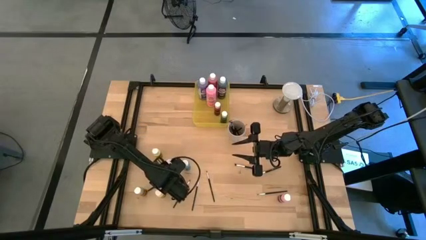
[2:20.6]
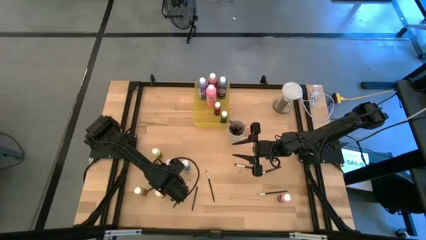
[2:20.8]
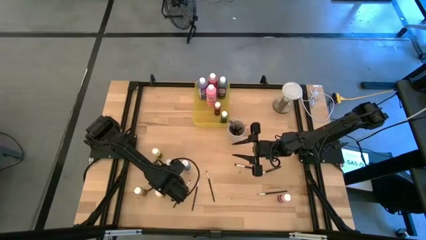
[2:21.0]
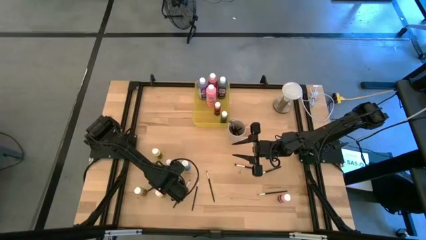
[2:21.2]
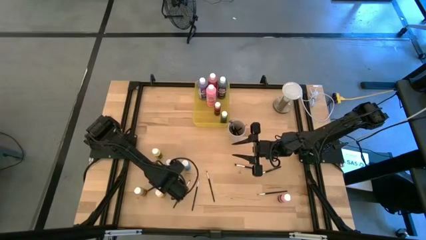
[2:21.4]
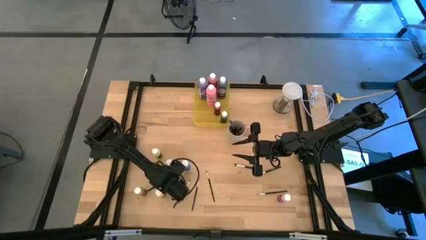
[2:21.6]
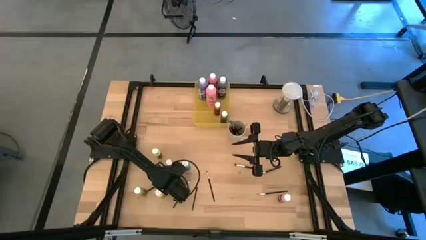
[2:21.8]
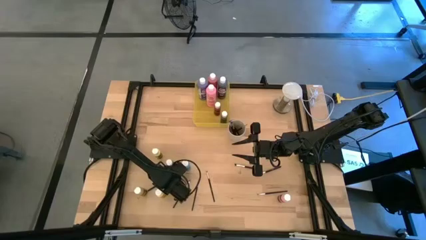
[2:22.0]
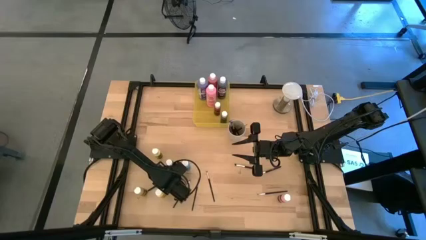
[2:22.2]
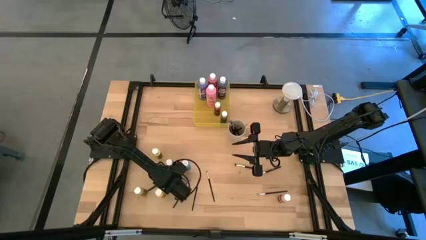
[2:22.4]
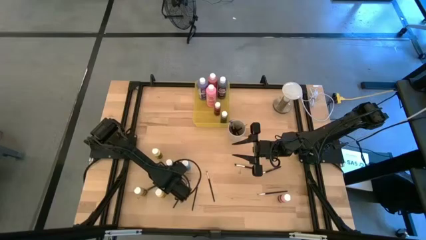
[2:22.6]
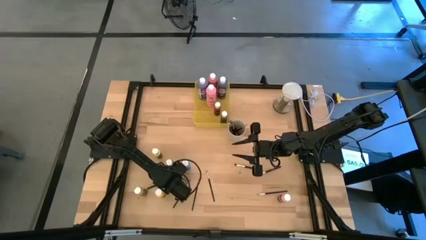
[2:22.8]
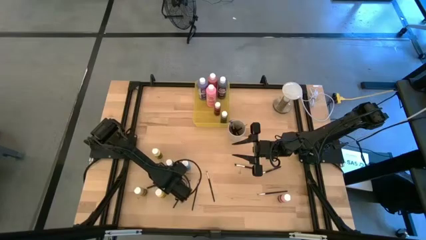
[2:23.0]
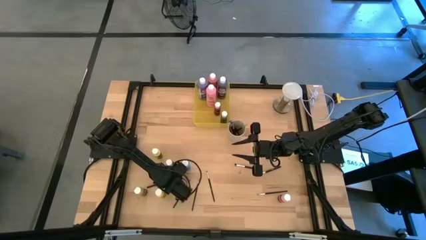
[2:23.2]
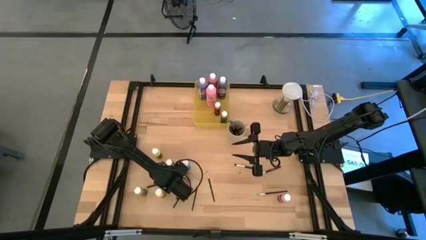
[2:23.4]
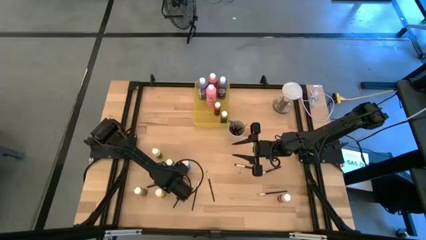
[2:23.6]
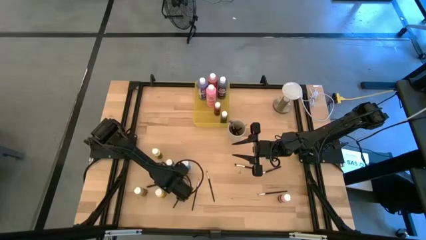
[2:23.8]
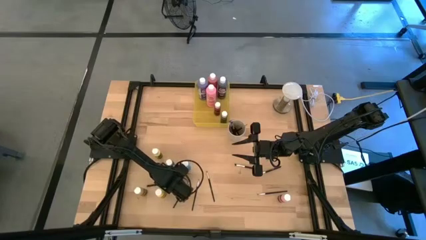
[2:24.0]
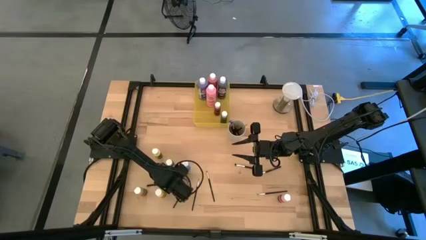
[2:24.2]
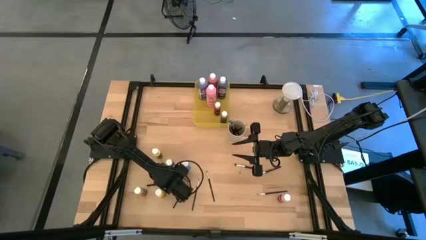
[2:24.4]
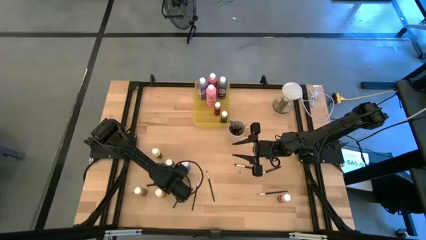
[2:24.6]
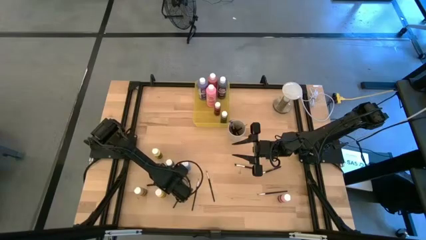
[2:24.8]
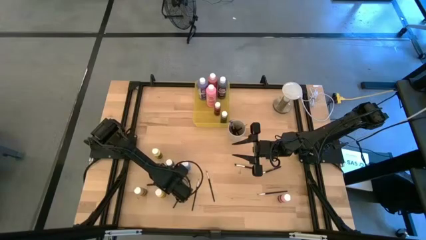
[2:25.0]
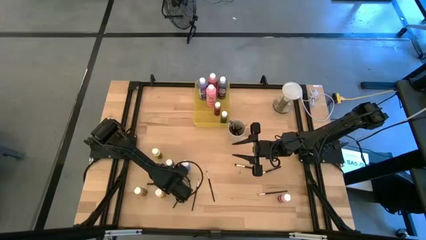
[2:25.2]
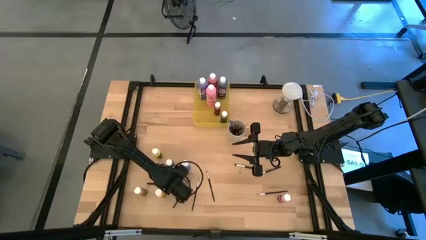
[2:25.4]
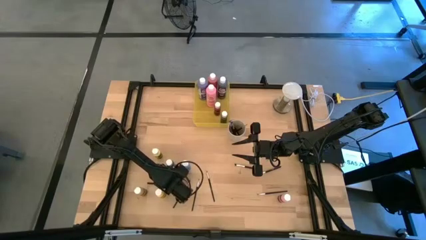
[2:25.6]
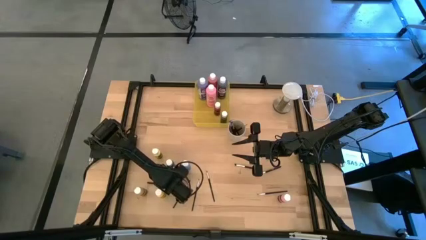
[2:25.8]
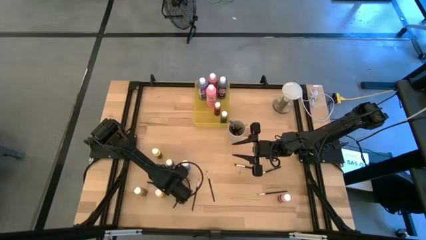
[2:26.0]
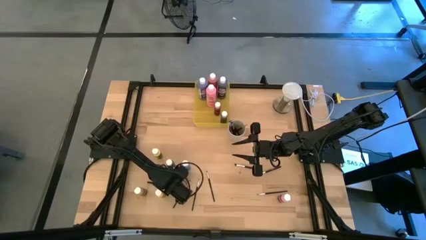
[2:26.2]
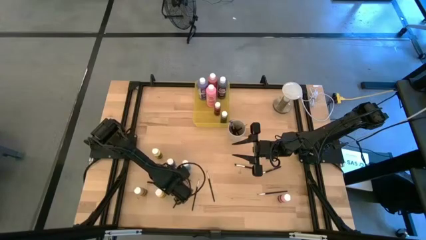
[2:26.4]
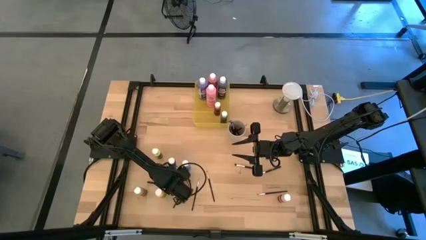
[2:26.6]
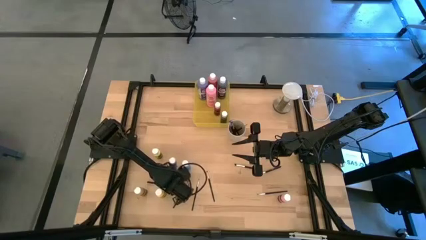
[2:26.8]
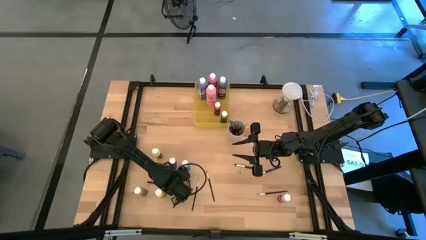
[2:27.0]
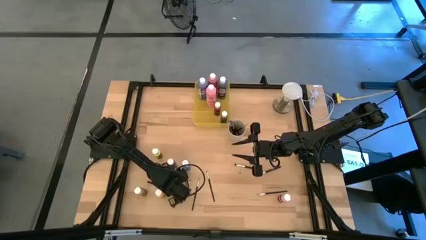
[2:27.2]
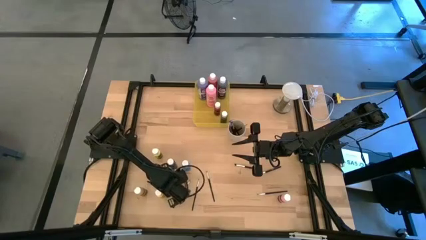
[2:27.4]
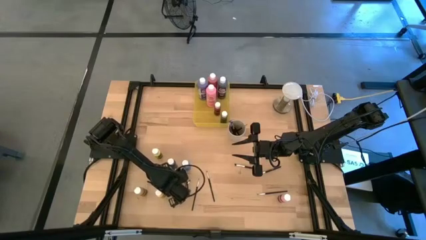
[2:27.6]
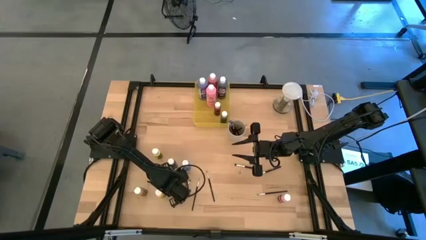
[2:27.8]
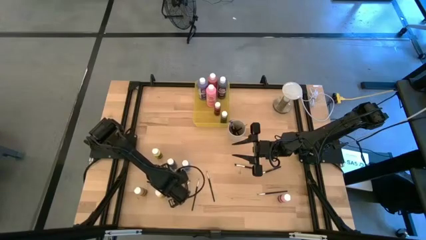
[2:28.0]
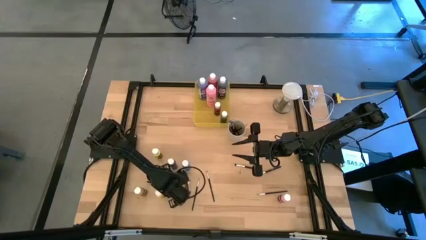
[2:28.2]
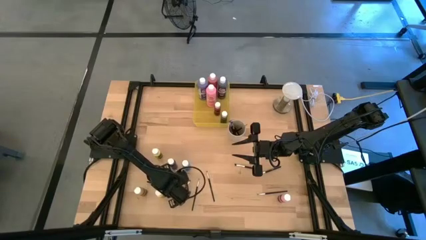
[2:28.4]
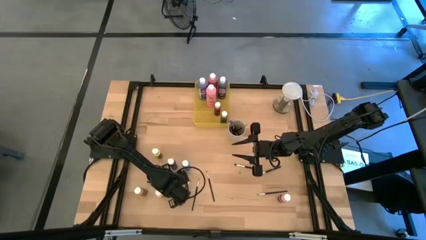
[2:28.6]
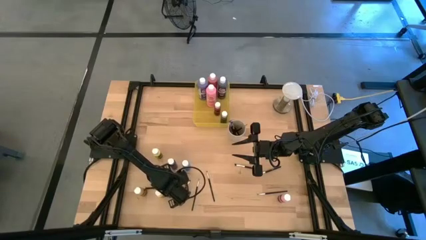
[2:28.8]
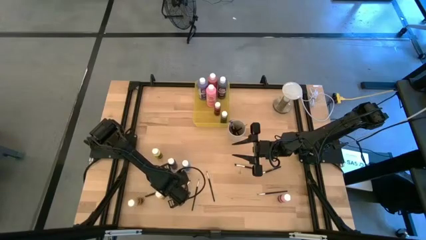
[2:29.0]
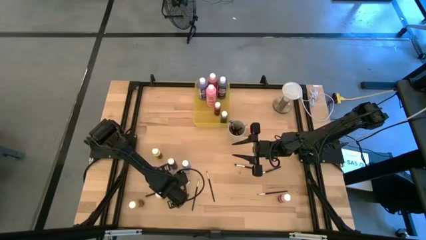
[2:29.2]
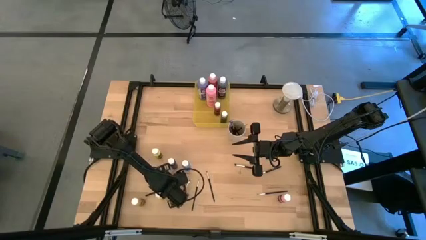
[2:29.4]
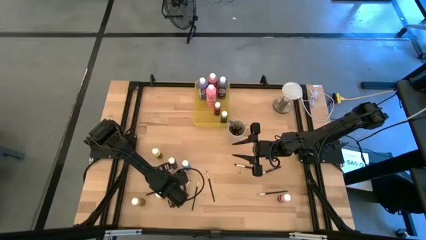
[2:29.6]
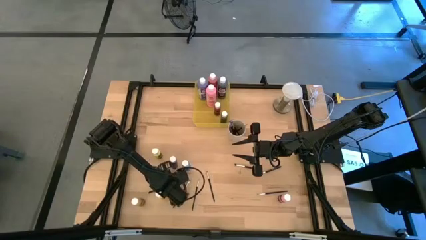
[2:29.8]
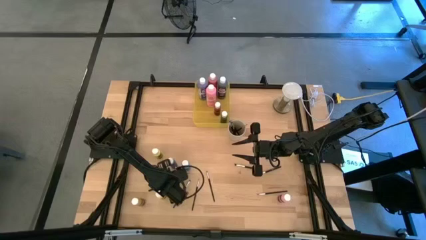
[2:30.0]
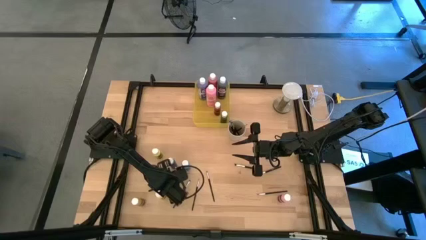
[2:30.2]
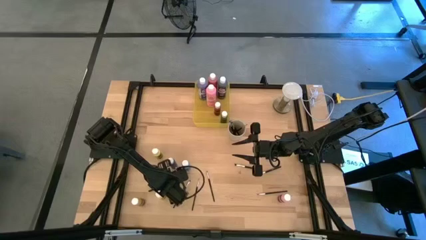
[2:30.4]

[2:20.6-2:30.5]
Task: Pick & Place Paint Supplies
Put the black paintbrush into the white cup

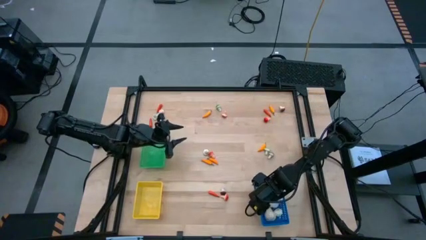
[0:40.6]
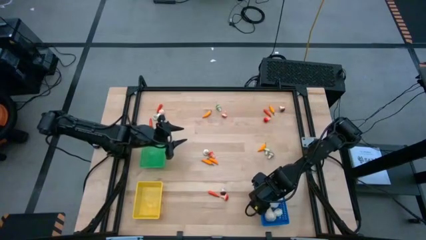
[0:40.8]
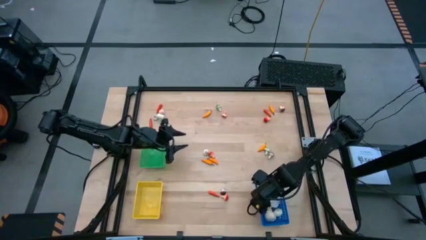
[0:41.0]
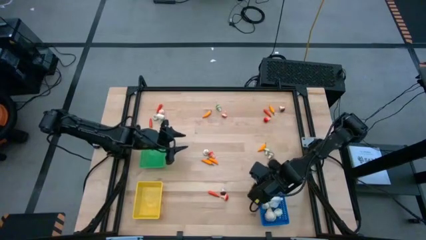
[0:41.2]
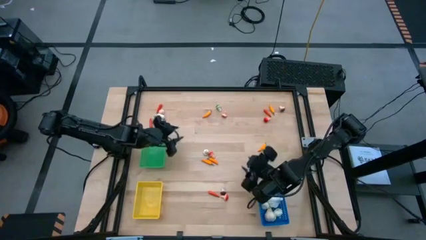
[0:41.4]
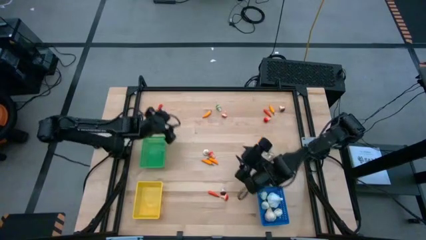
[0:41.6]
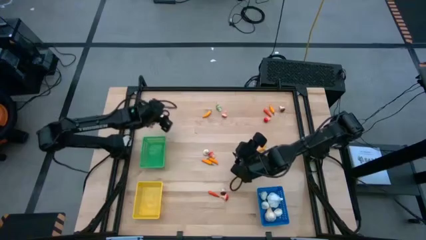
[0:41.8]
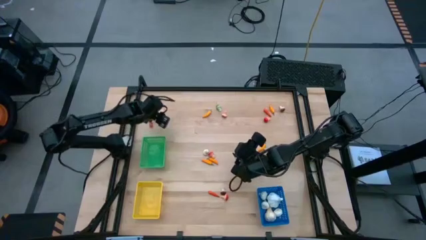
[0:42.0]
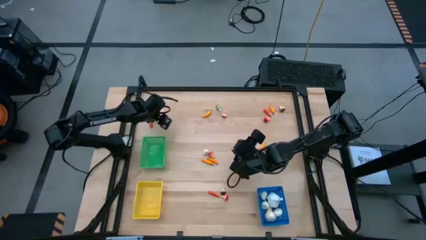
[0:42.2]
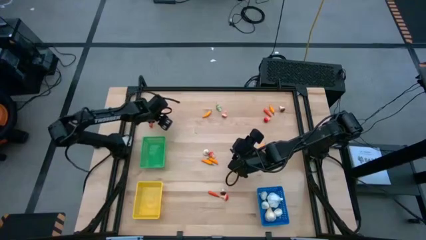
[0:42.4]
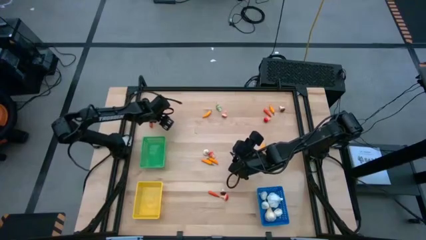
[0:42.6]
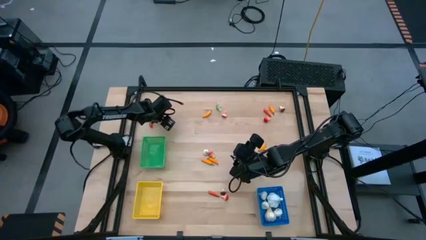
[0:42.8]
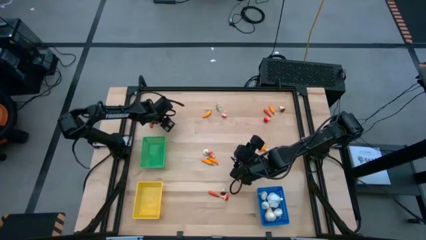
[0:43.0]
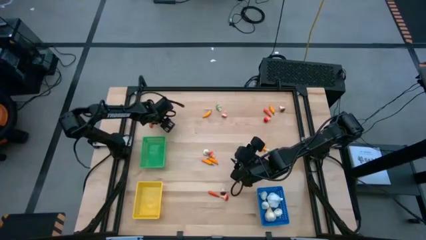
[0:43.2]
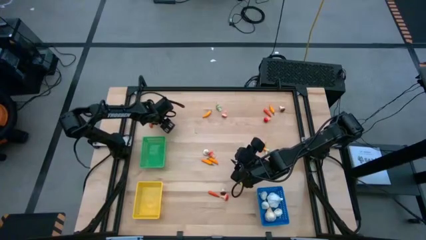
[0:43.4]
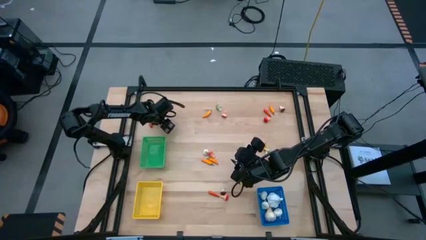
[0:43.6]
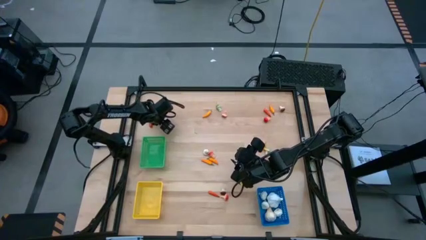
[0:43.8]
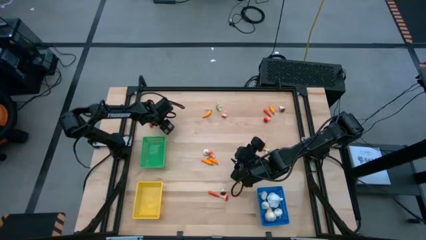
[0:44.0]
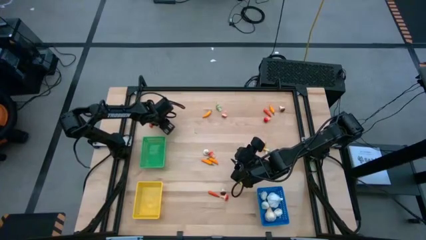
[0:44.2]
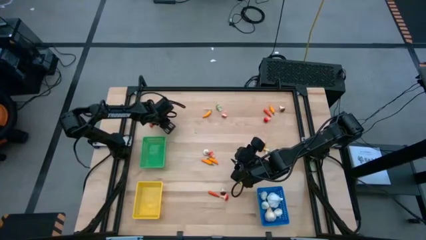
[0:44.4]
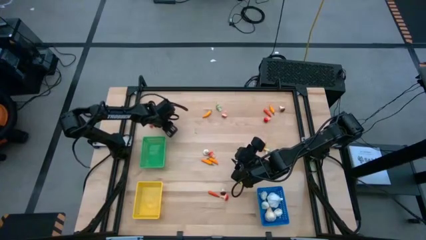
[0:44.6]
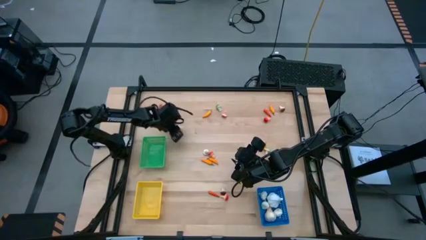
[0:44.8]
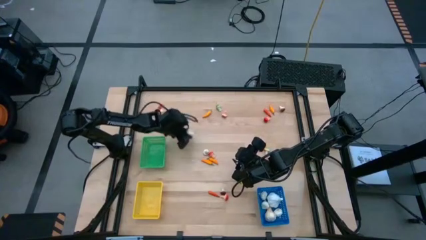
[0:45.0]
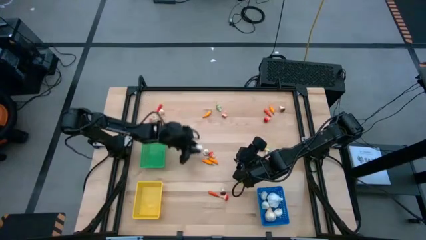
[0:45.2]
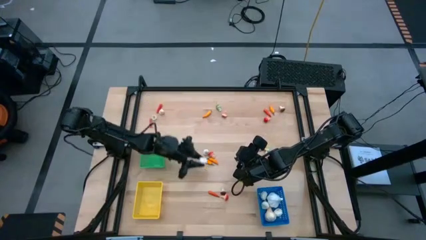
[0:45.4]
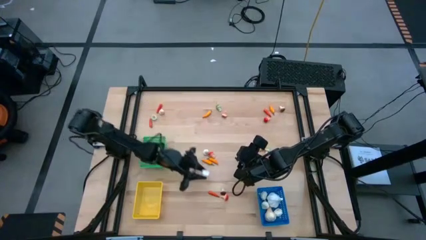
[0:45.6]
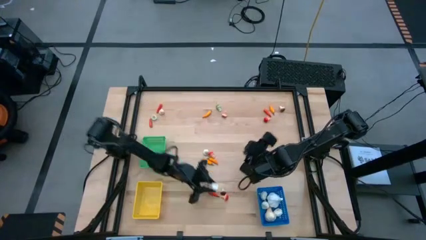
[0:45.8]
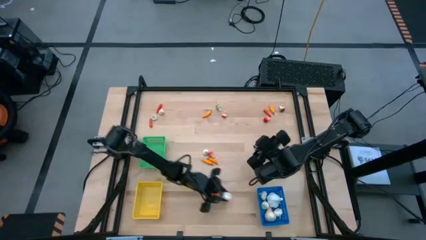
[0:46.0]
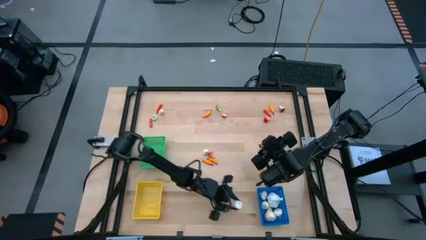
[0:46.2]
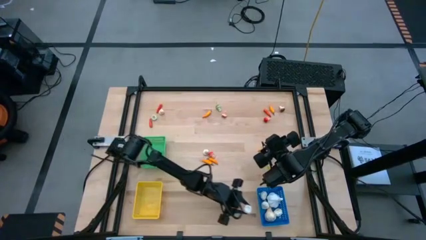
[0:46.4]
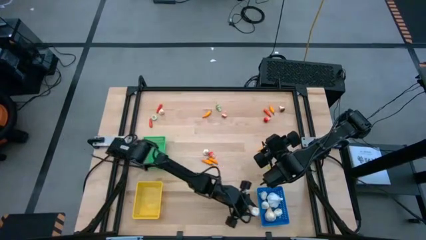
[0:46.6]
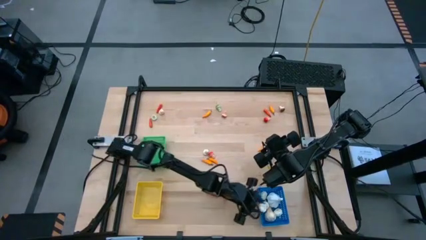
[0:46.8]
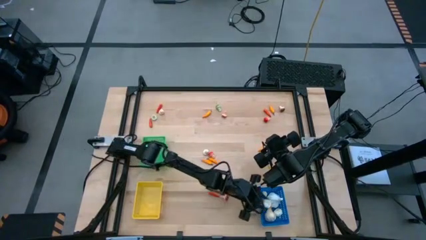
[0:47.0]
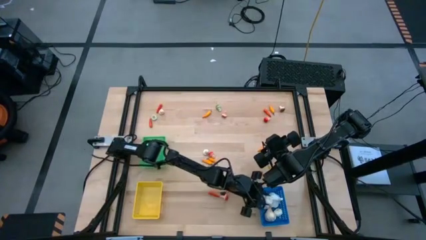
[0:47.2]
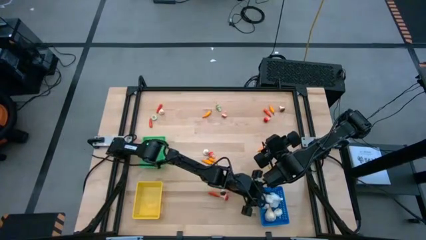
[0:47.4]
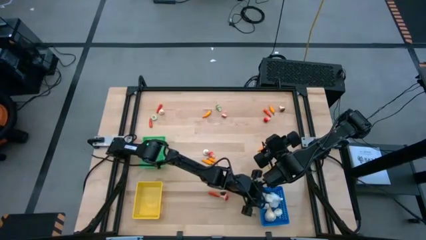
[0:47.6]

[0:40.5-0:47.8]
Task: Sort produce into baskets
Put the garlic into the blue bin

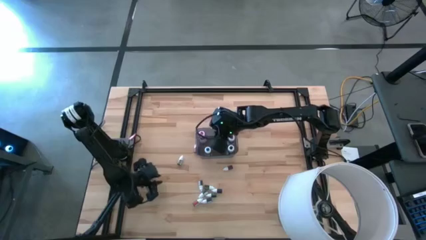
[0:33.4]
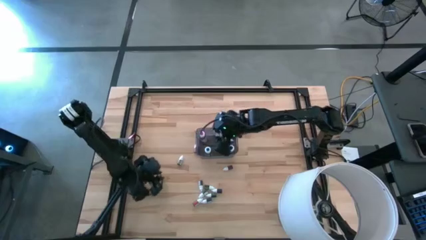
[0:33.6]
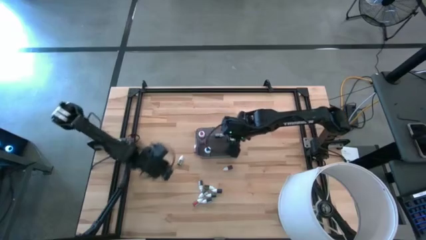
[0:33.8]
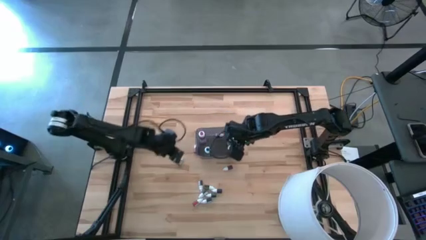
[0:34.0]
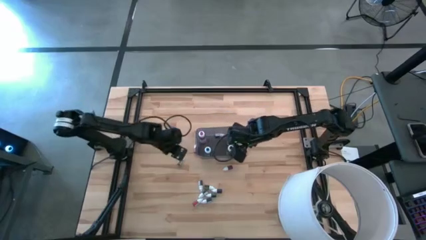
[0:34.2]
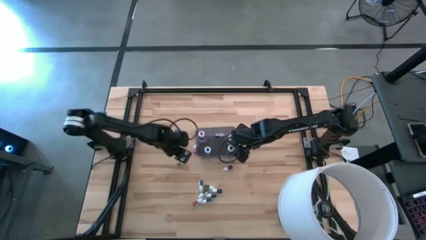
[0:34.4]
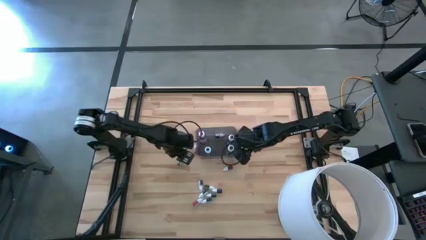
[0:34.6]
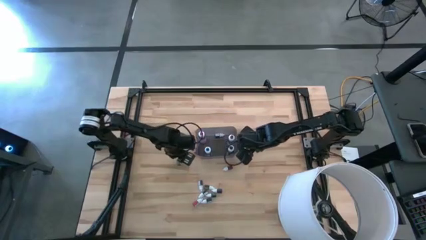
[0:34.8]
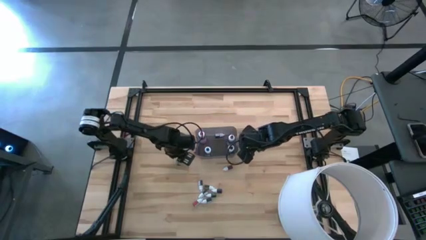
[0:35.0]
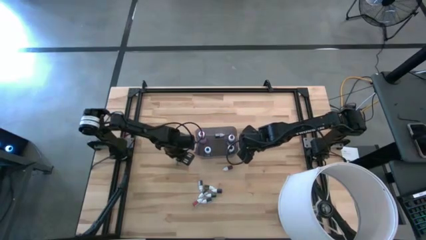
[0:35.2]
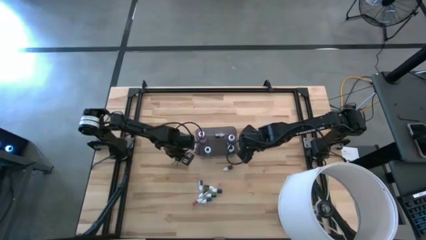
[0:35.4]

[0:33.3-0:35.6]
Task: Pick & Place food coloring
Put the top small green food coloring bottle in the black bin
